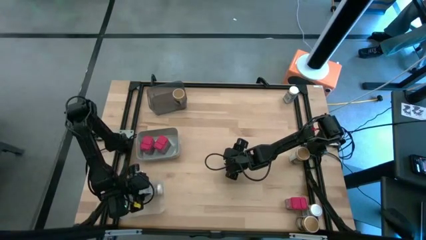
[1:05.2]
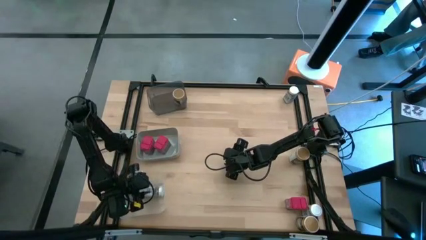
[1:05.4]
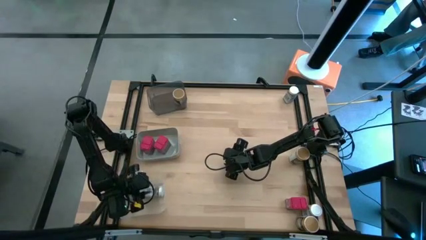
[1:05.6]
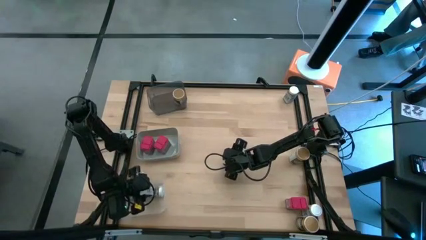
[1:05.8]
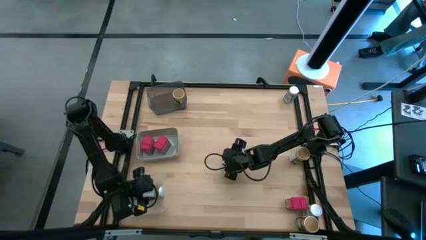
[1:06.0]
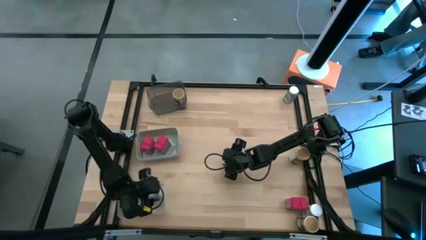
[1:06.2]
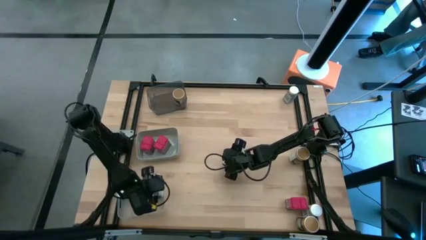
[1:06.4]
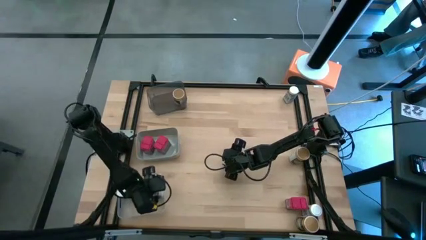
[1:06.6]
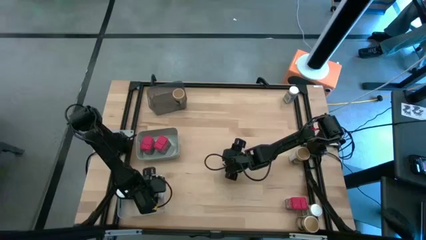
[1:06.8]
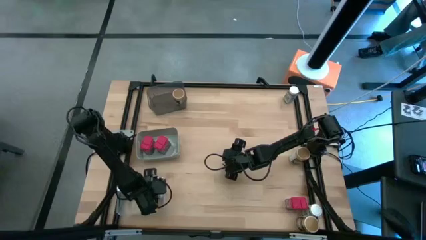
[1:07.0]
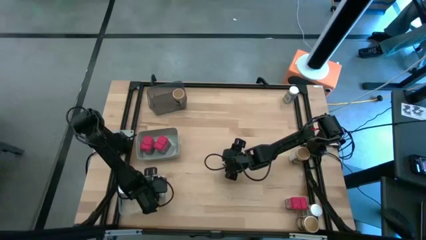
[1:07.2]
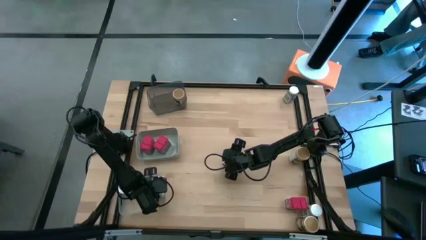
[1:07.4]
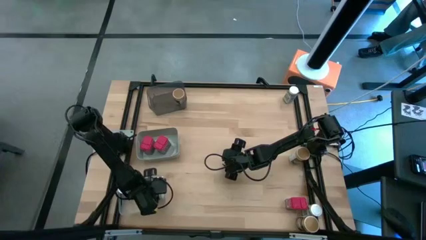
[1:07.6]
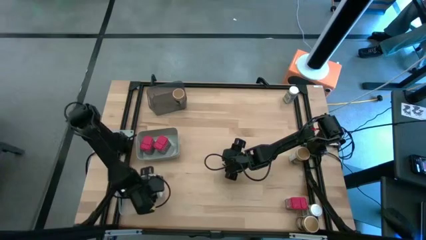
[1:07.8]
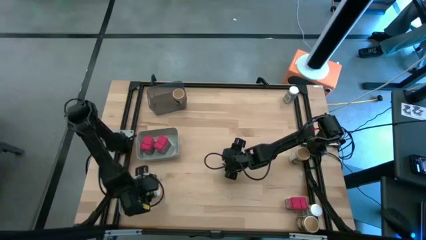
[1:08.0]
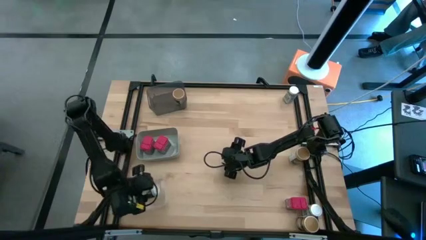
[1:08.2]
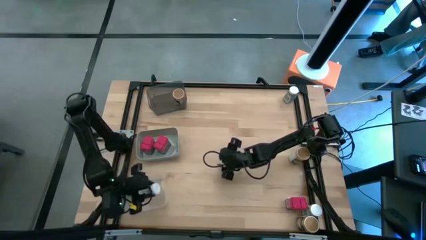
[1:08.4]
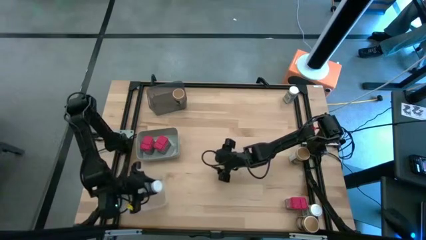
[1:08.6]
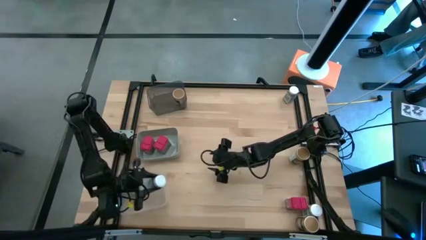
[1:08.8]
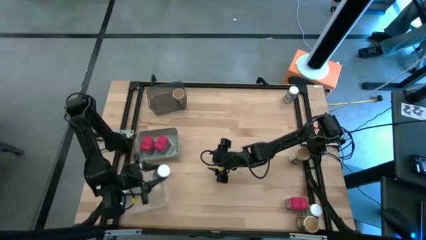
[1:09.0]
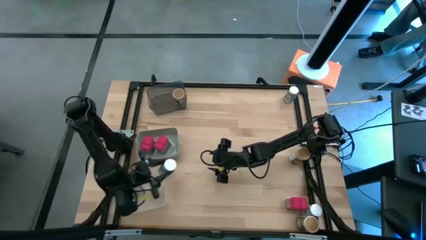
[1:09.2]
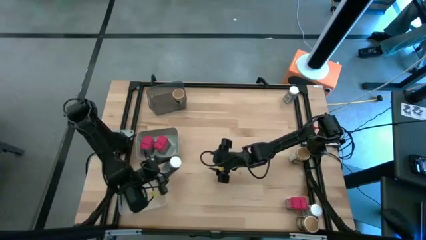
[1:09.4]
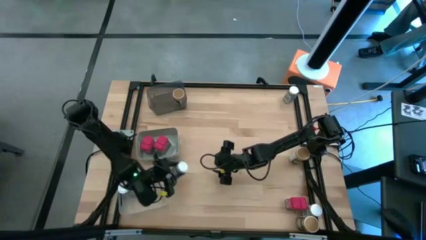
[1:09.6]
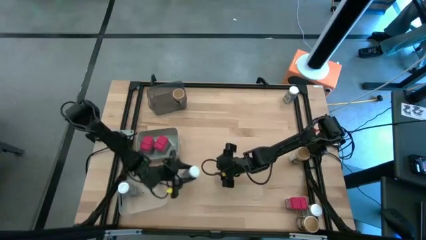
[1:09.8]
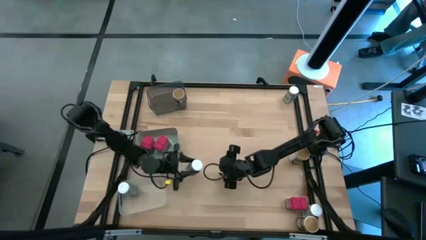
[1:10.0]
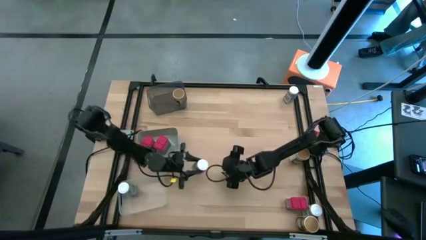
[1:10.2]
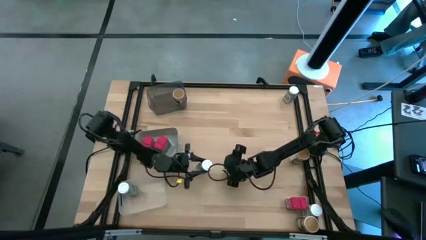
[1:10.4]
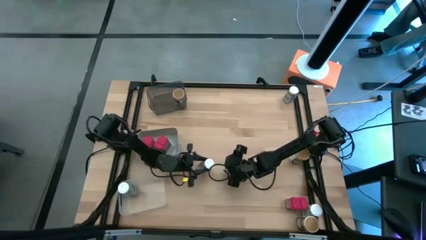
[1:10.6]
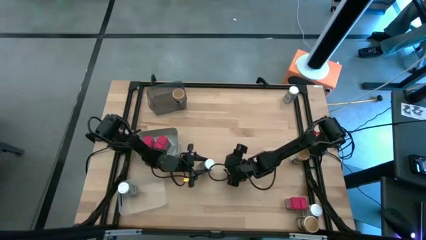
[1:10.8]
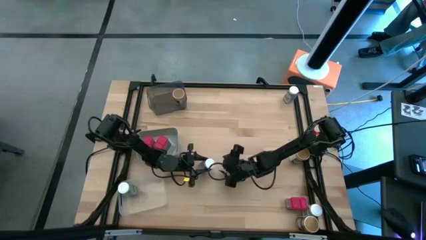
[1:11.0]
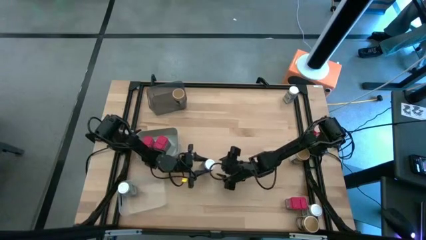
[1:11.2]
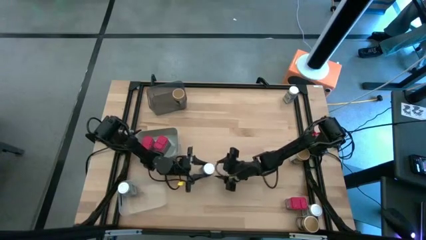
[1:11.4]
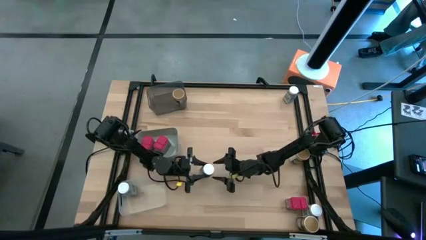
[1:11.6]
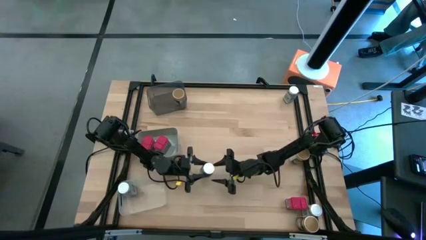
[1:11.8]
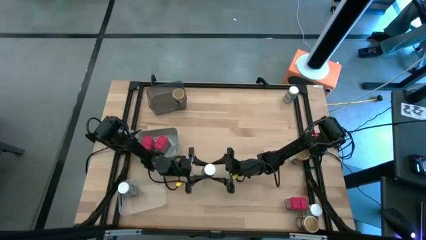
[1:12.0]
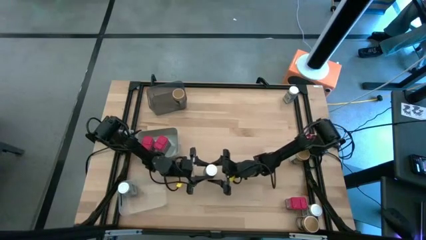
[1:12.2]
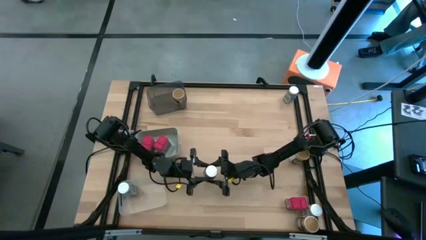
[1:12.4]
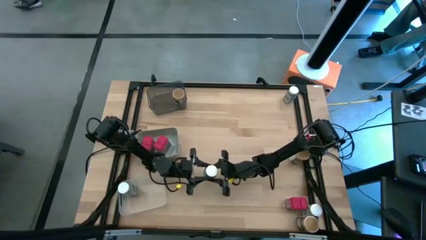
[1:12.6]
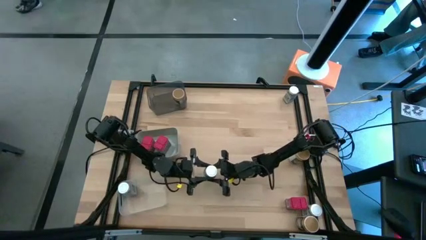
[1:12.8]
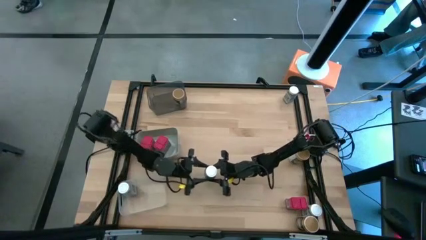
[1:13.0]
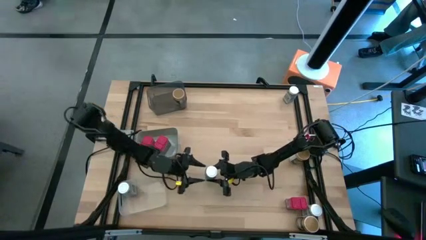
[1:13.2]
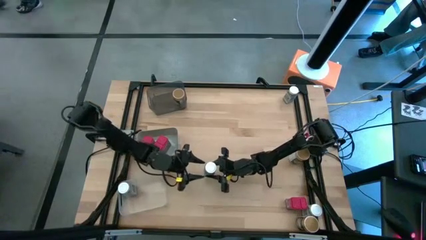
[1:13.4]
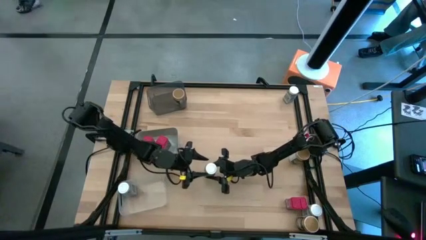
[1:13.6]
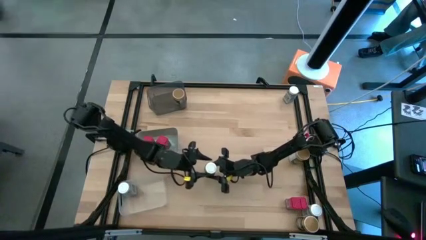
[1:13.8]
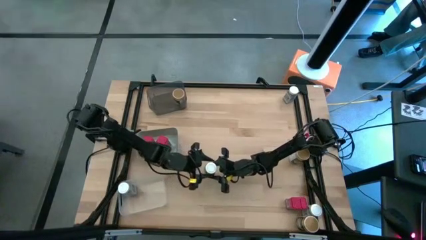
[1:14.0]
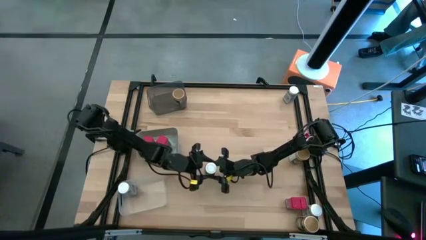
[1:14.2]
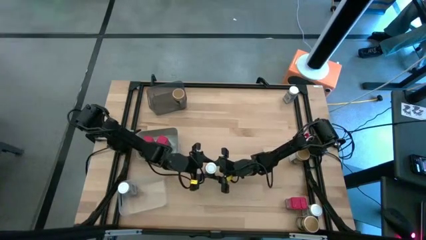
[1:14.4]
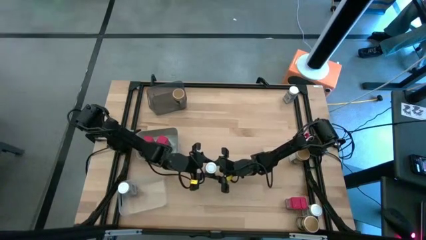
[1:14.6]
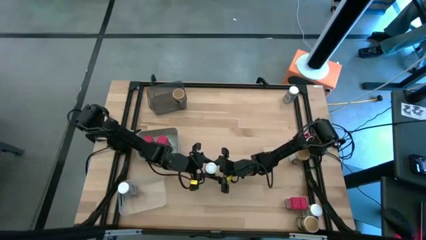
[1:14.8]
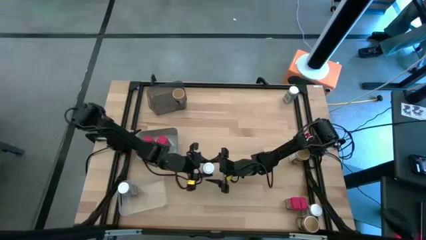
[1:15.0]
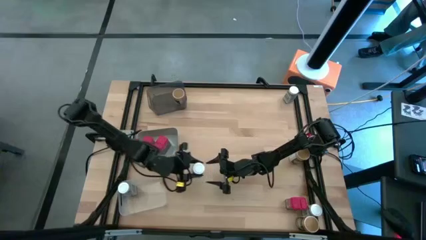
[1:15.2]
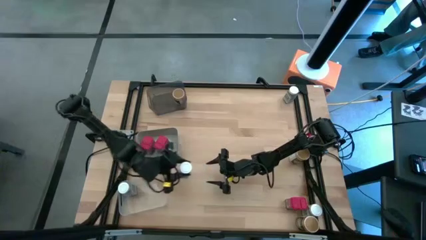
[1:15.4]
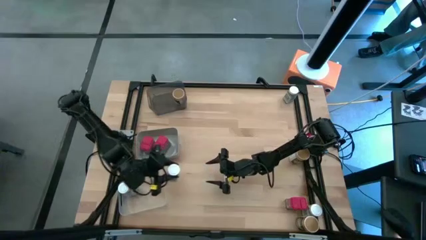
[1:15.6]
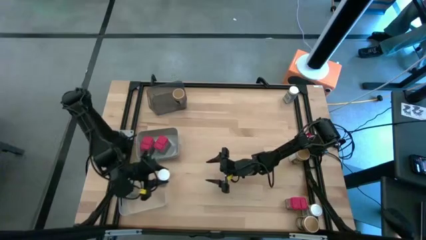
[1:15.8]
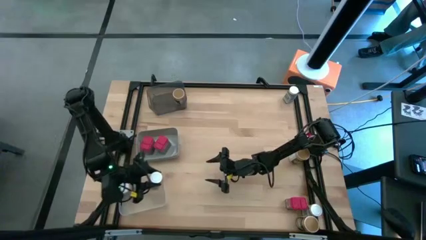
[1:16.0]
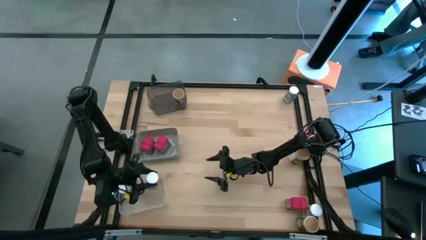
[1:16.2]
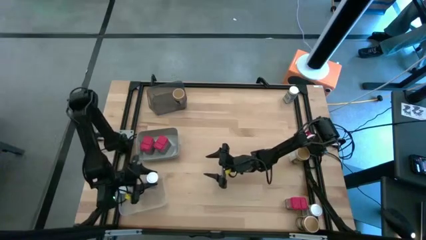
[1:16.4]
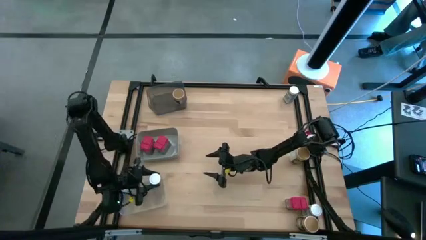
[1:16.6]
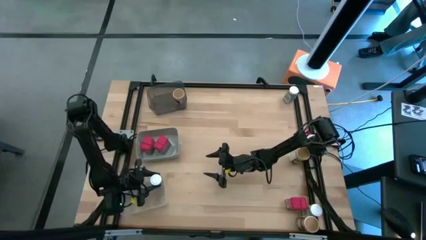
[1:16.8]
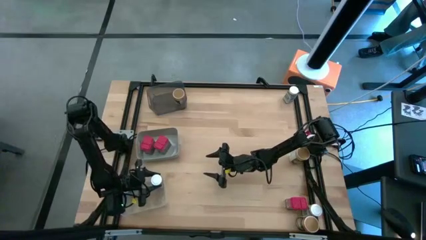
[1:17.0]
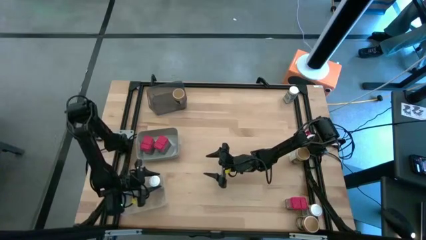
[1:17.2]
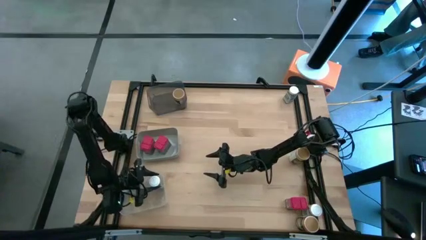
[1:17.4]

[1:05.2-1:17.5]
Task: Sort spices by type
Put the top middle white seasoning bottle into the transparent bin

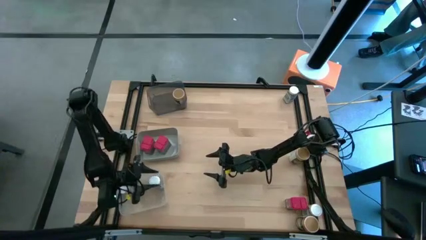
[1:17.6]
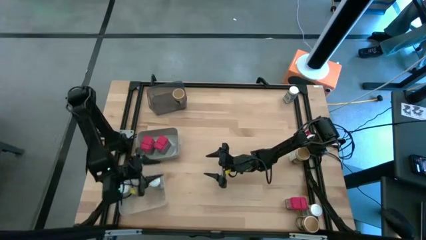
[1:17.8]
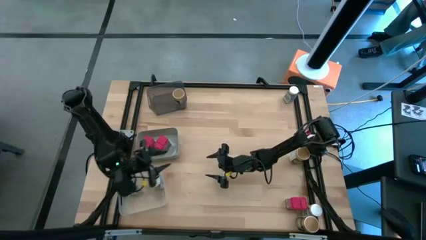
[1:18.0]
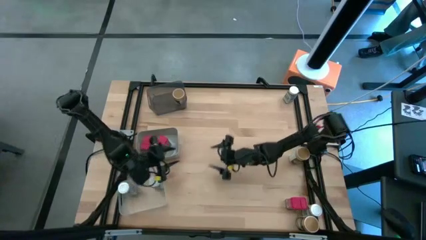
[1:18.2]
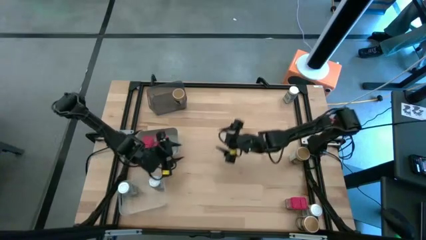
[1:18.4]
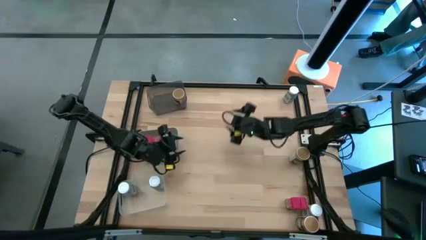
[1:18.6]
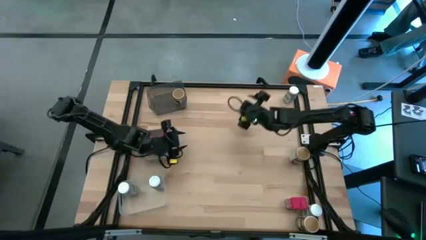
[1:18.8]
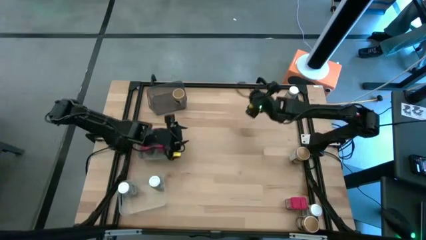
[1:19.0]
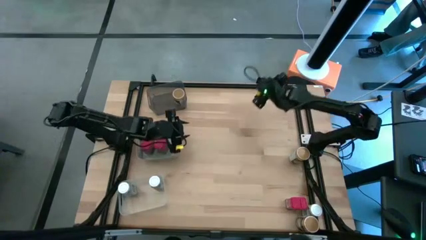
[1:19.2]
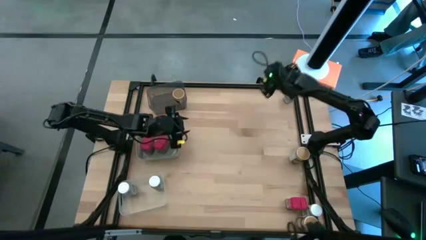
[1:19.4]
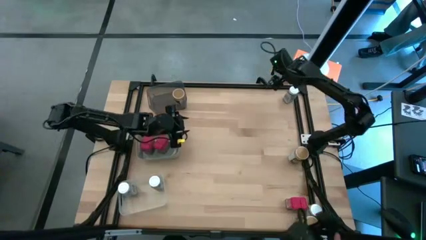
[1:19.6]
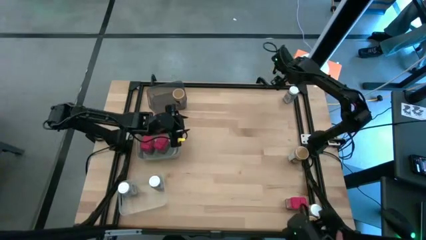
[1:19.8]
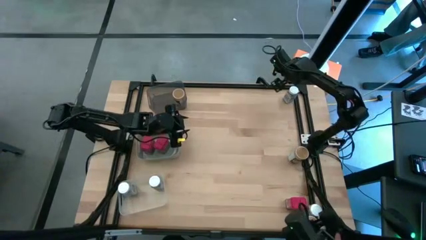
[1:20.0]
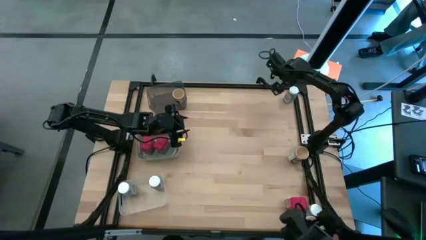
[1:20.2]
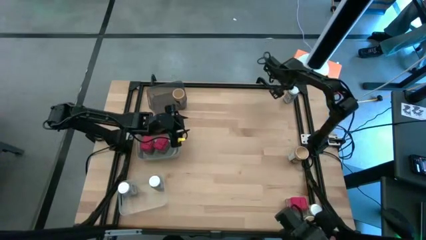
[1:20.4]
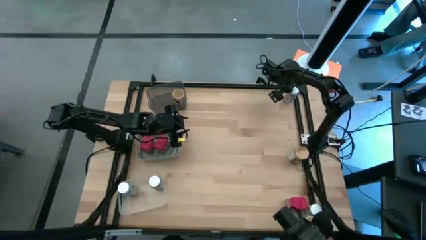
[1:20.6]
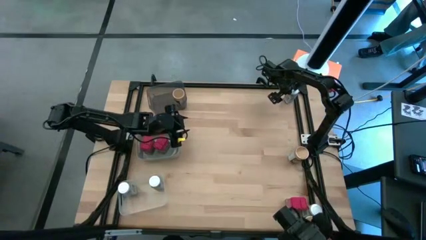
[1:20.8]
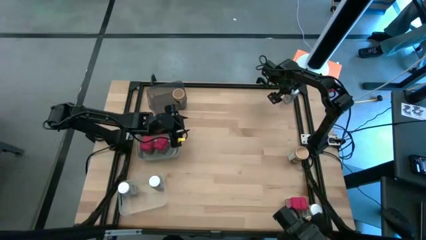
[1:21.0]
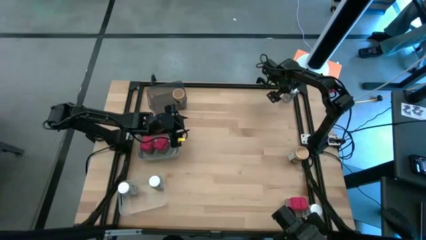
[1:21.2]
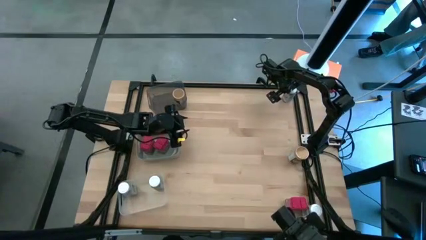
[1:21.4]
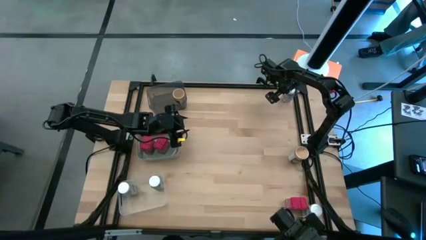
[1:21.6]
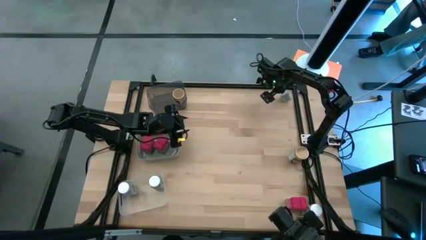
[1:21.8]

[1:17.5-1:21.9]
Put the top white seasoning can into the bottom left transparent bin
